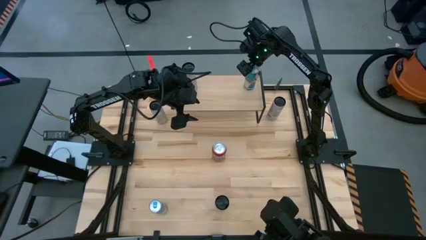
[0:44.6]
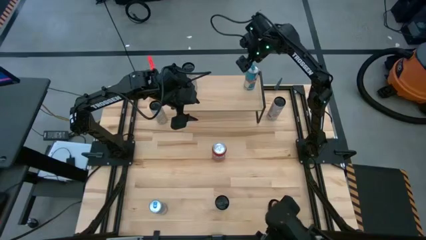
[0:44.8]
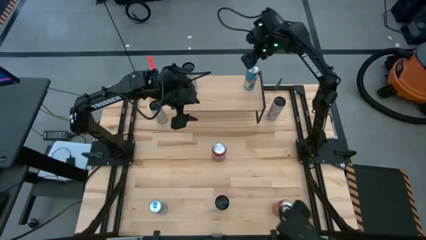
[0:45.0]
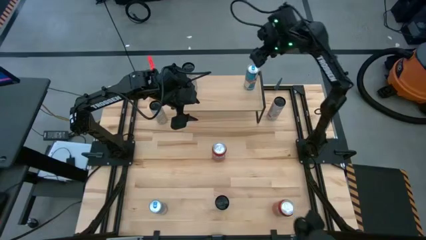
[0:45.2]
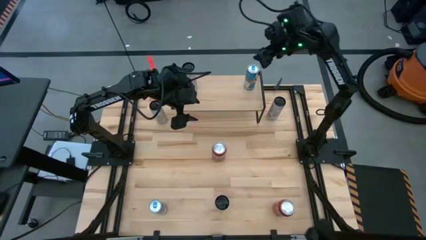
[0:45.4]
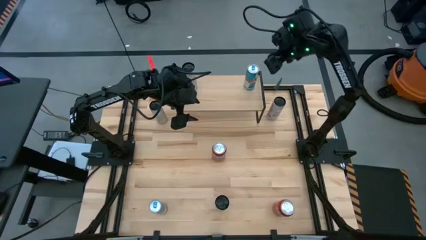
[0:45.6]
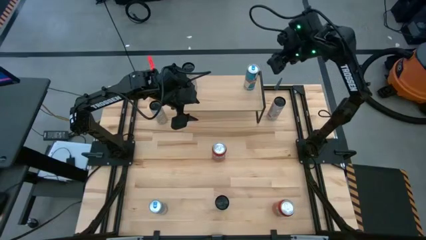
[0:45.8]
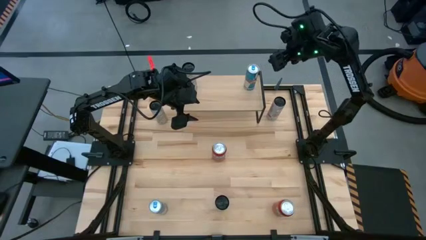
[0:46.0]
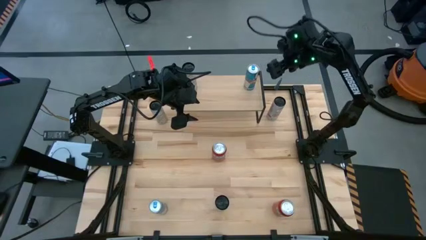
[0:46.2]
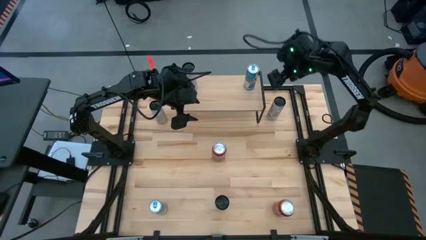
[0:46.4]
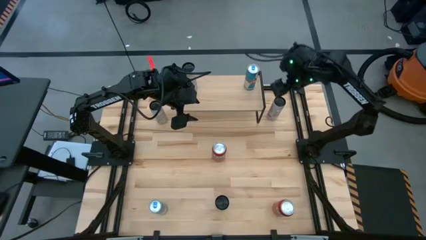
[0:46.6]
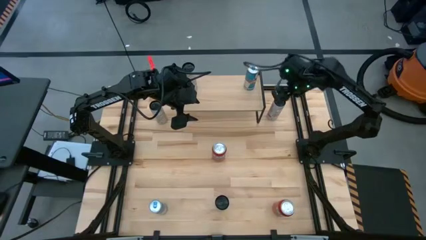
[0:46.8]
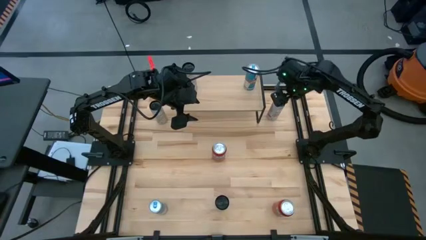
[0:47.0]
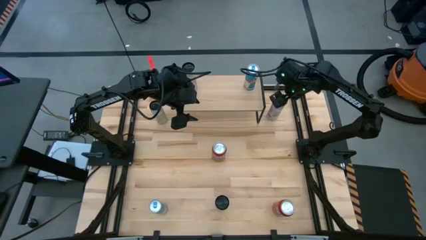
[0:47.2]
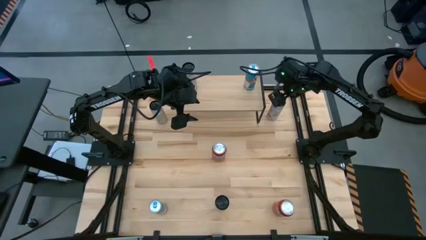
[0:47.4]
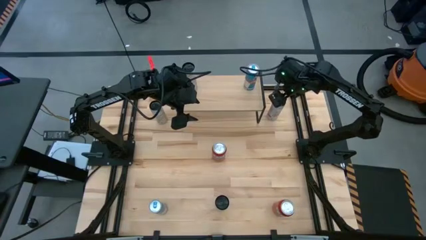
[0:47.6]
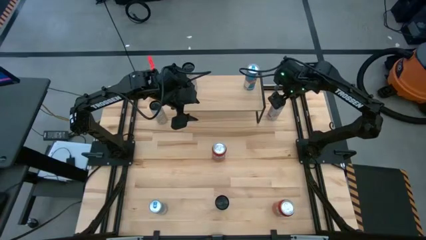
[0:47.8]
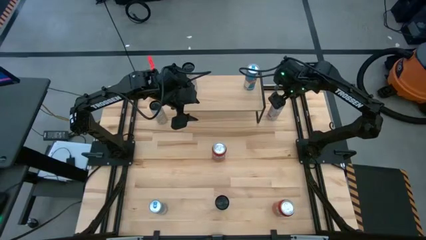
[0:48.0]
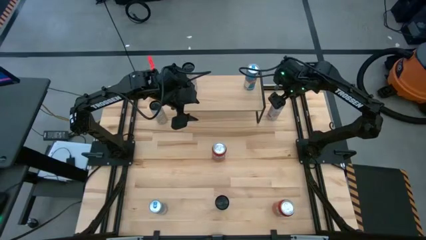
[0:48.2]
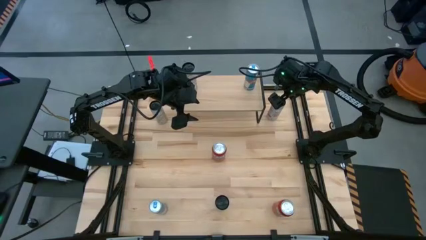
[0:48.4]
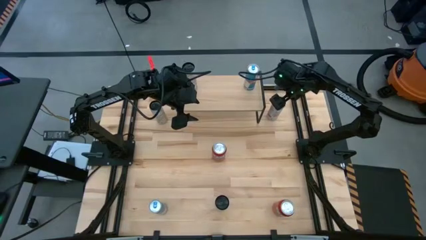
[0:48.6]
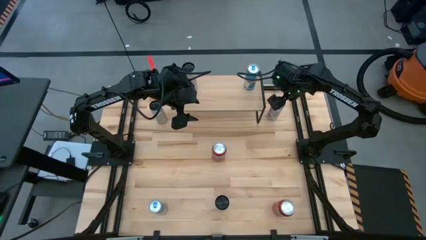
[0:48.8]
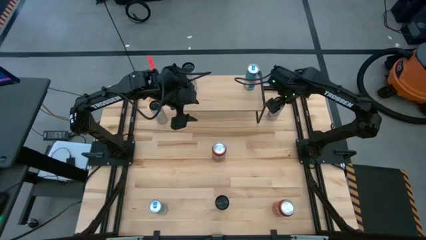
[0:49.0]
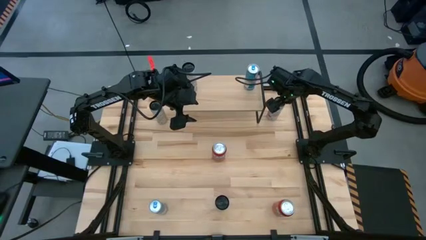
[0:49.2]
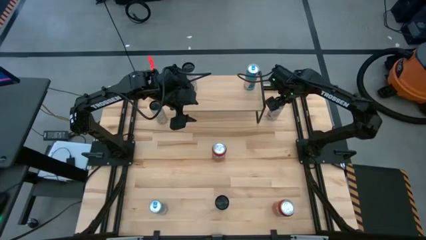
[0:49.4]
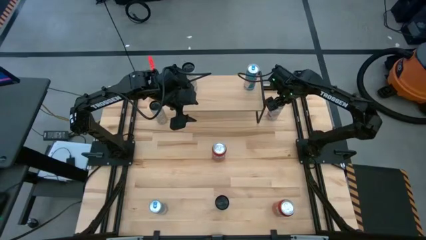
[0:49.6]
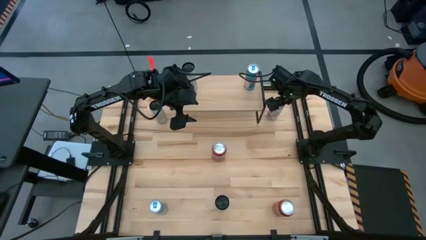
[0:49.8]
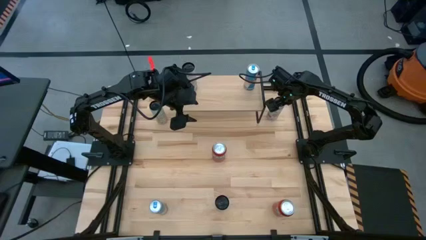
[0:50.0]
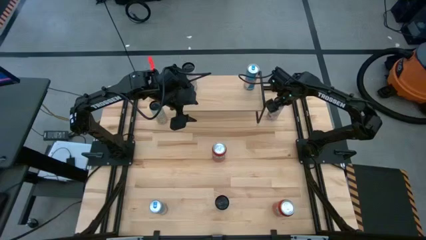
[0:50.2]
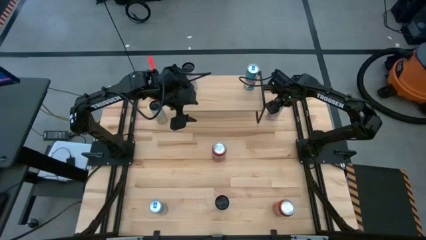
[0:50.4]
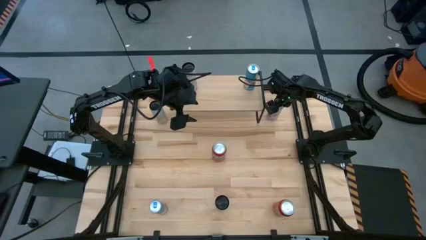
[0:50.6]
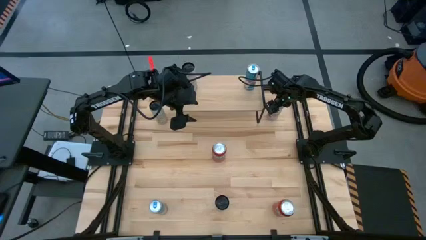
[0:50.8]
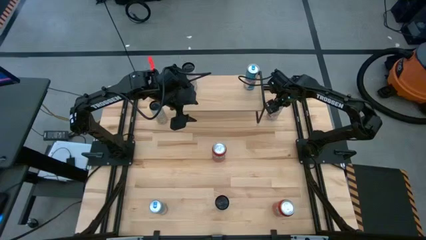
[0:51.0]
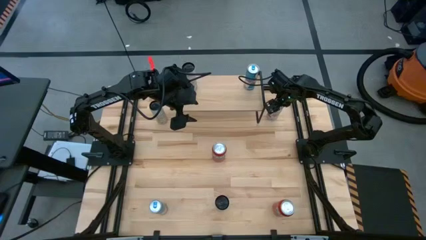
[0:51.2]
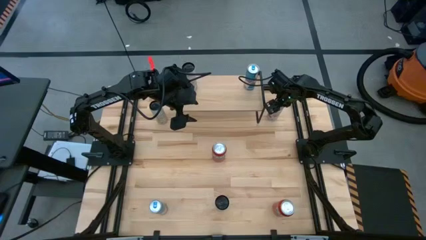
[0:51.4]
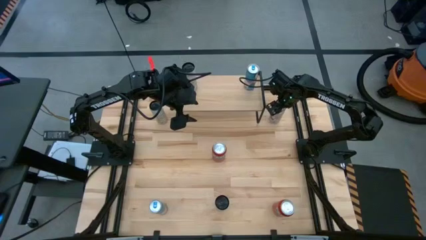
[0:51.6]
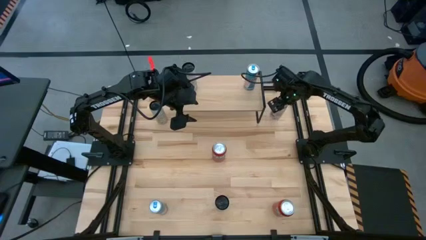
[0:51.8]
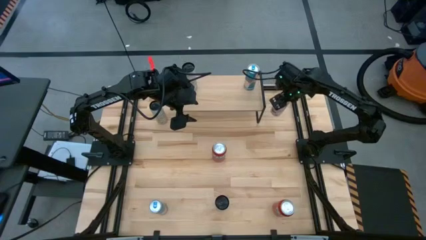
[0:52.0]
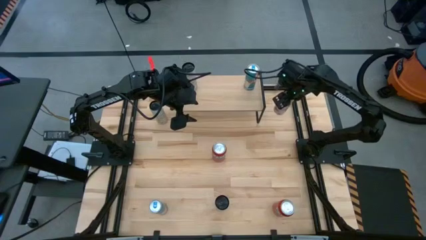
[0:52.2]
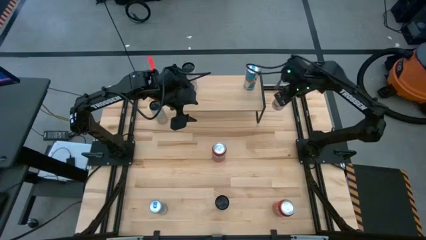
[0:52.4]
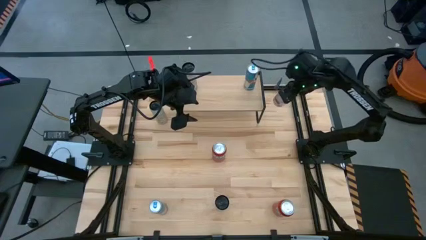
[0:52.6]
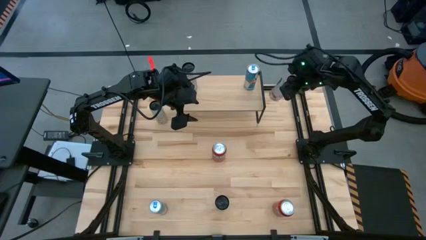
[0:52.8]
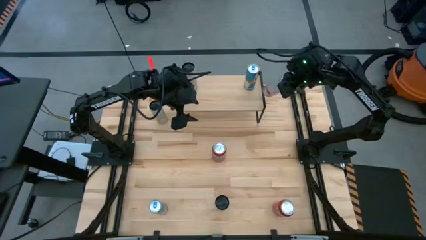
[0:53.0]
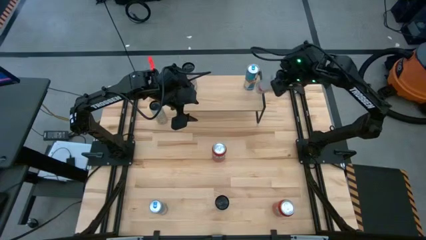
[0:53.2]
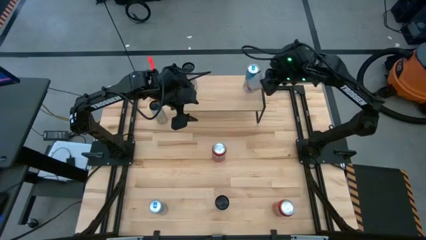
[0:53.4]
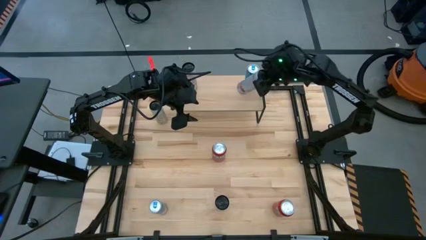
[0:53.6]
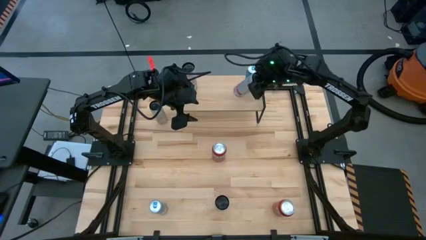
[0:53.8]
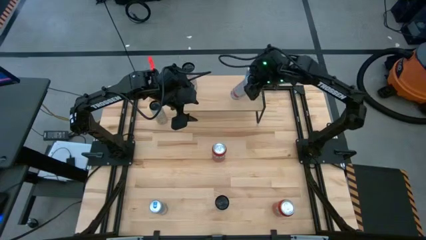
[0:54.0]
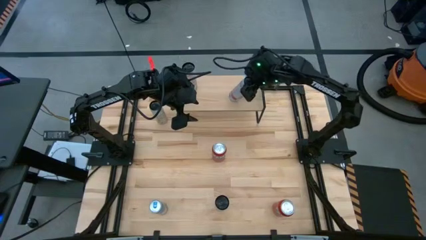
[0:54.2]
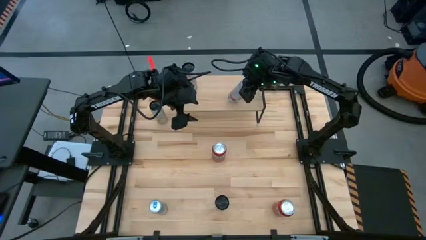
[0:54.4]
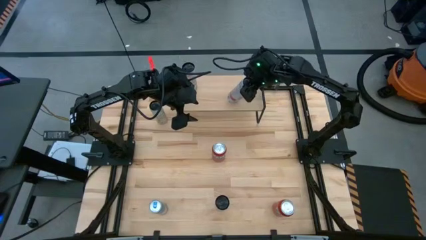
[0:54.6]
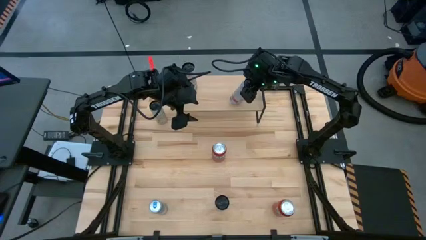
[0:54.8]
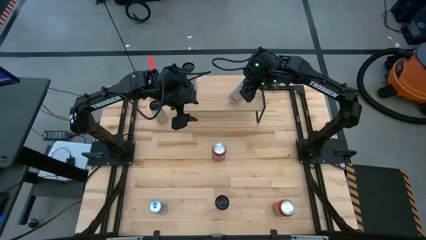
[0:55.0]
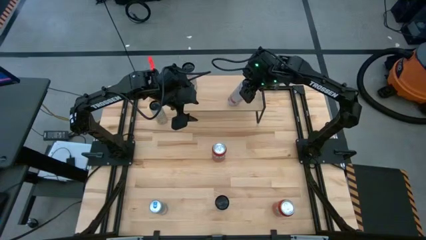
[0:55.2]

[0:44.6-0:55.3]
Task: Place canned beverage on shelf
Put the top white pink soda can on the shelf
